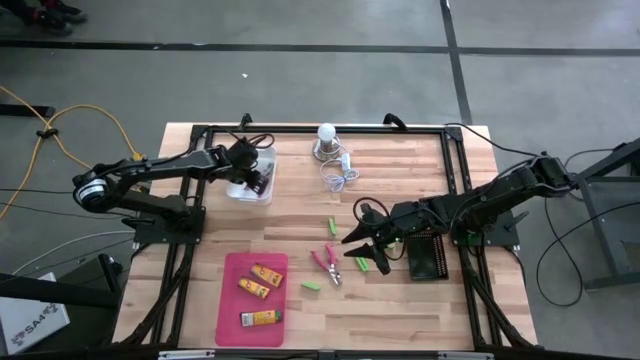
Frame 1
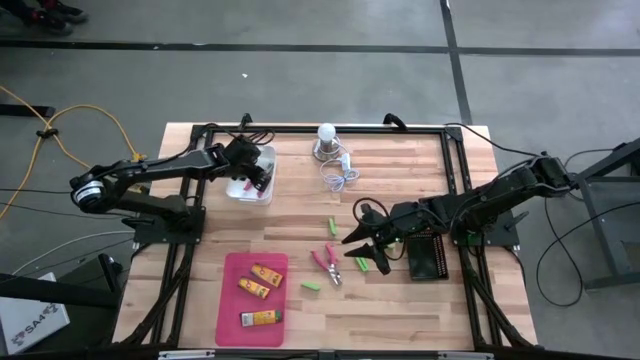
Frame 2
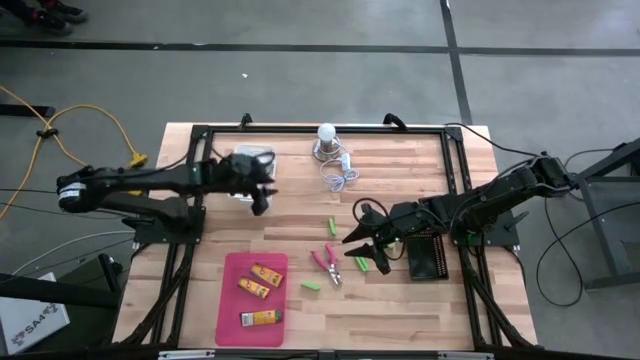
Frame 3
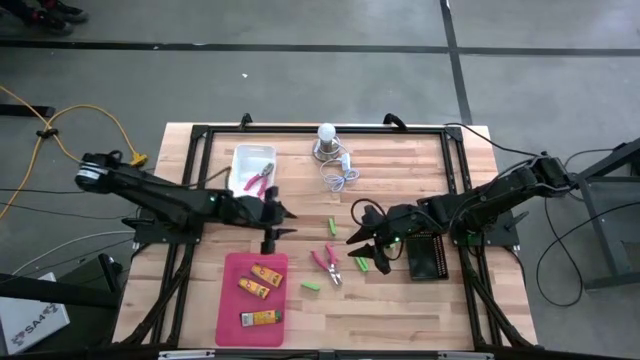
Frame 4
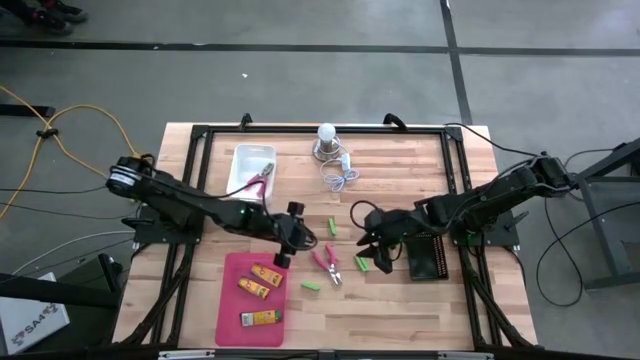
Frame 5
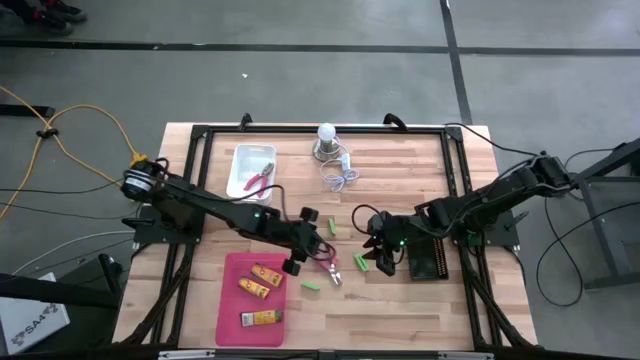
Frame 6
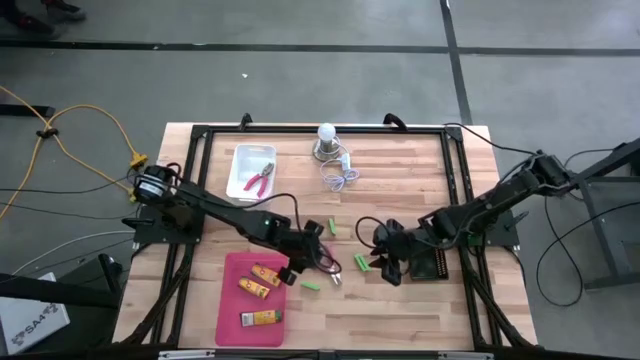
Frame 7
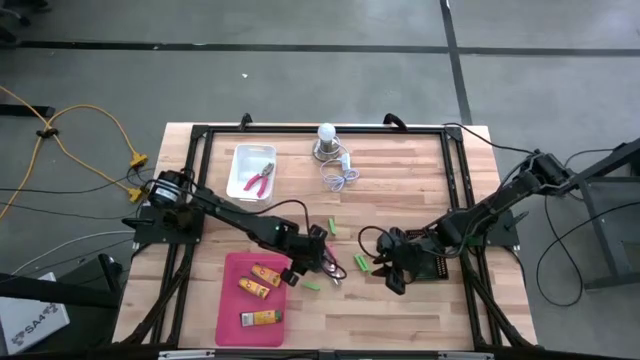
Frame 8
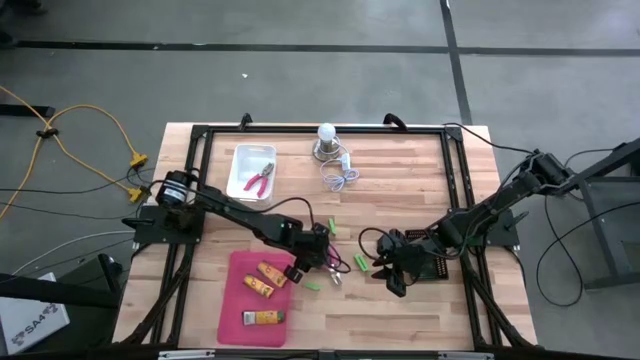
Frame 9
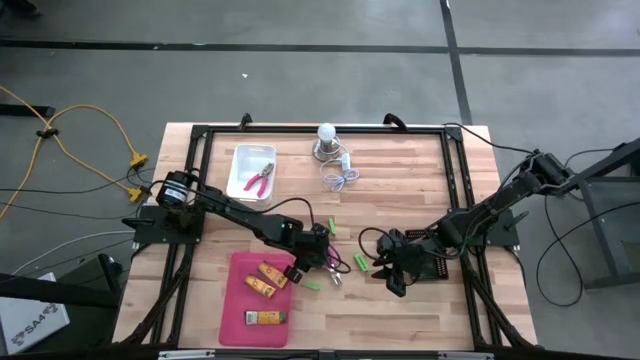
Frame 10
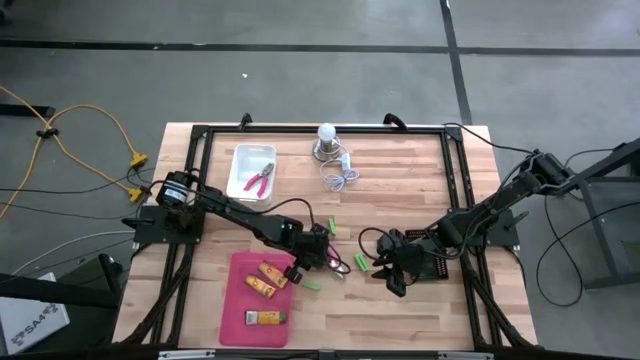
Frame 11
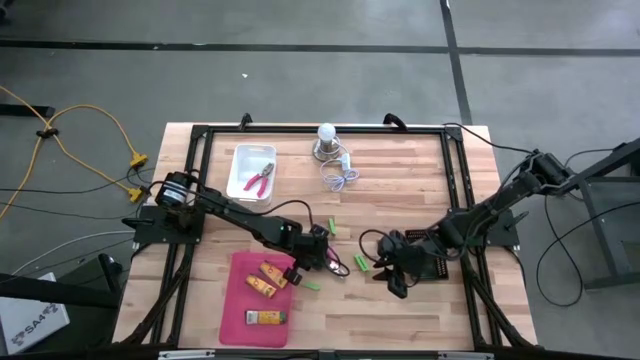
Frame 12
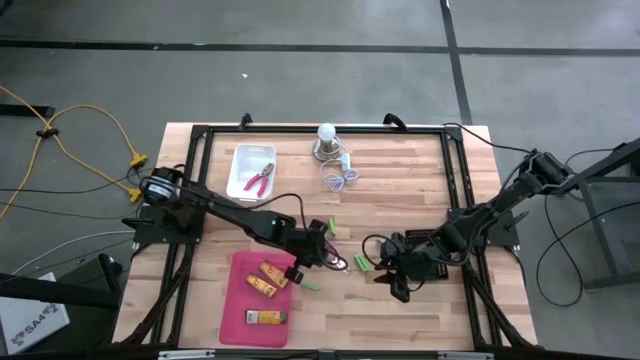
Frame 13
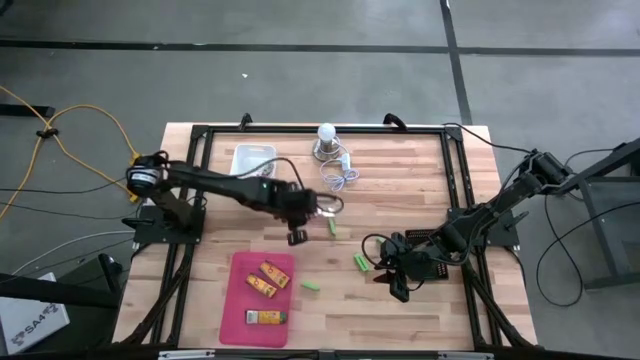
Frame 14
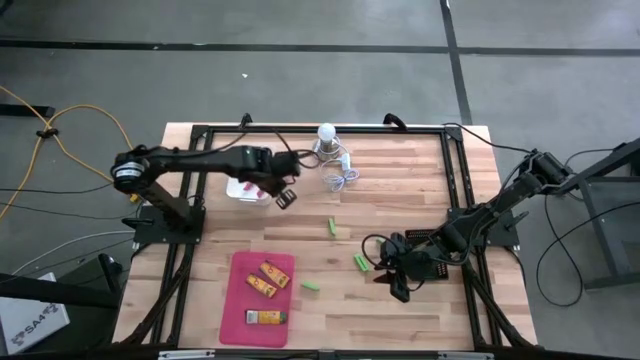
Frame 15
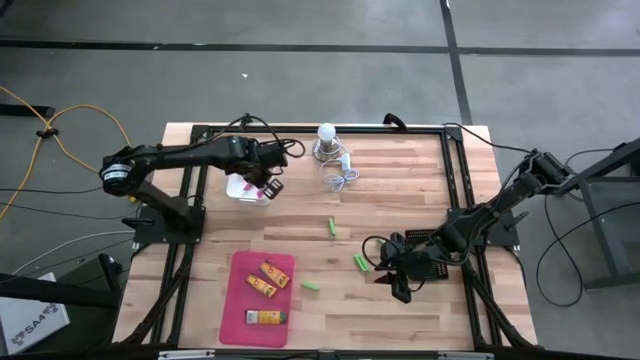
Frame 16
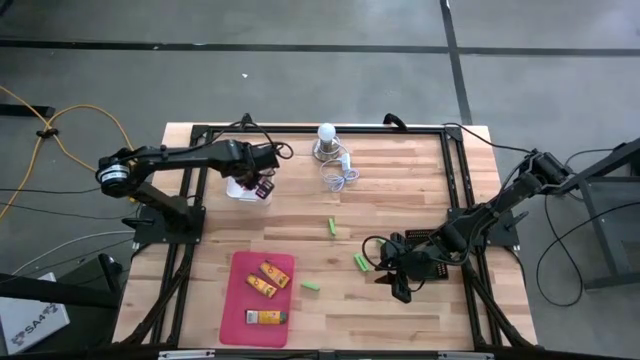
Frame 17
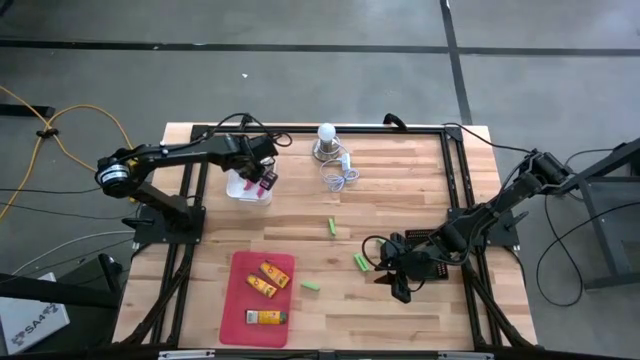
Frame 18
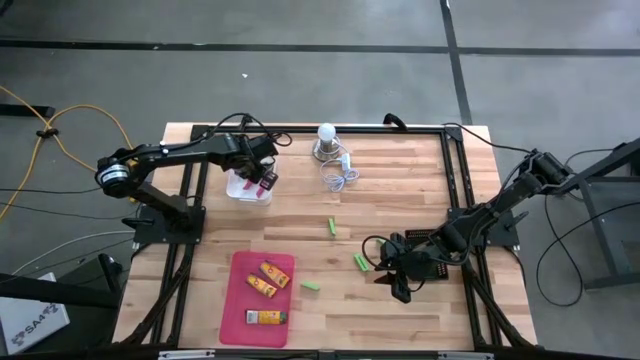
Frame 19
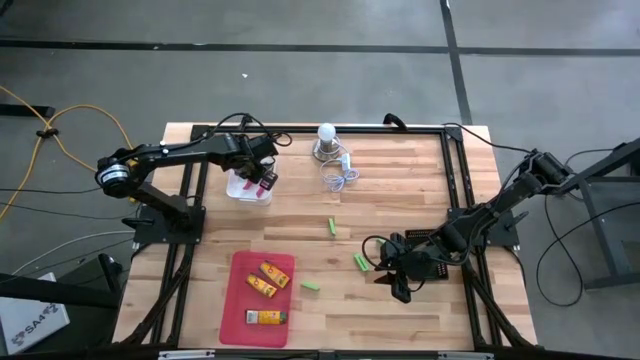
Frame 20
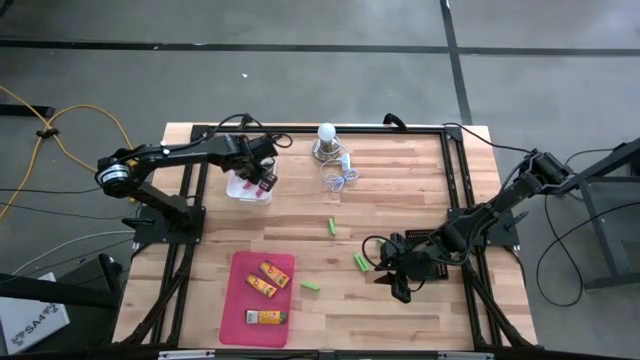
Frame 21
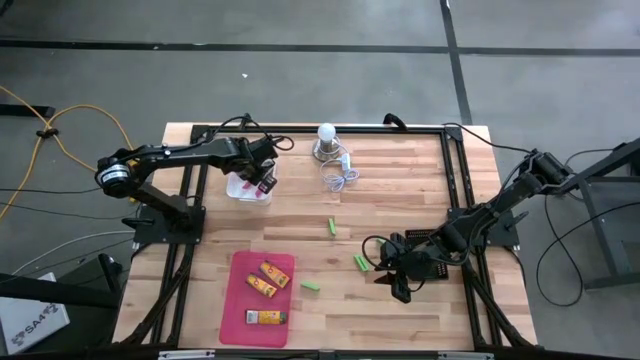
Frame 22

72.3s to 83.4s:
Task: Pick & Place School Supplies
Put the pink pliers into the white bin

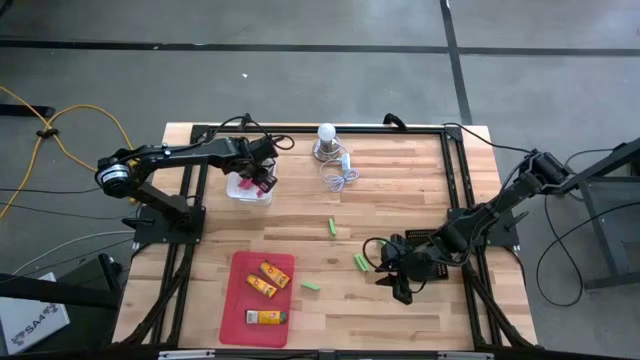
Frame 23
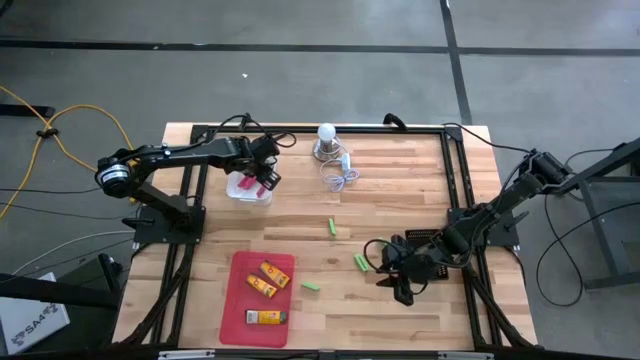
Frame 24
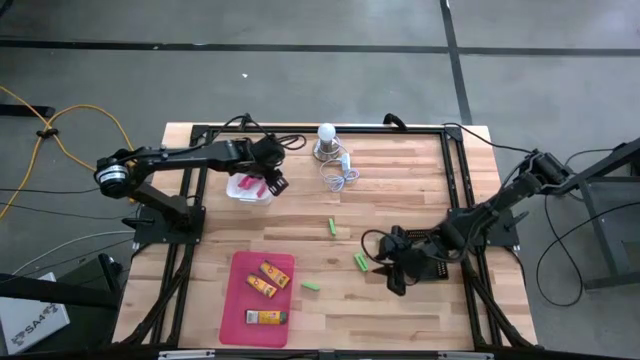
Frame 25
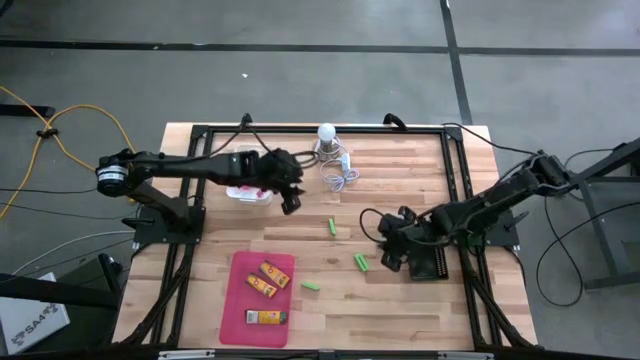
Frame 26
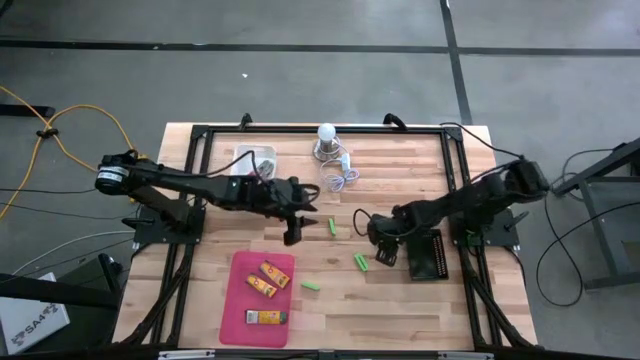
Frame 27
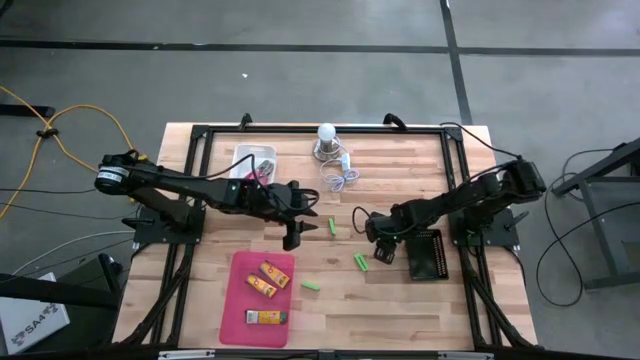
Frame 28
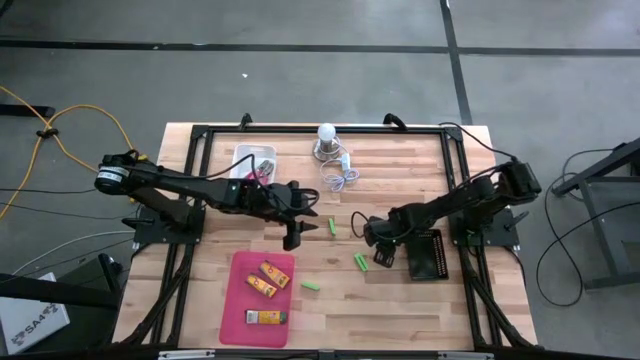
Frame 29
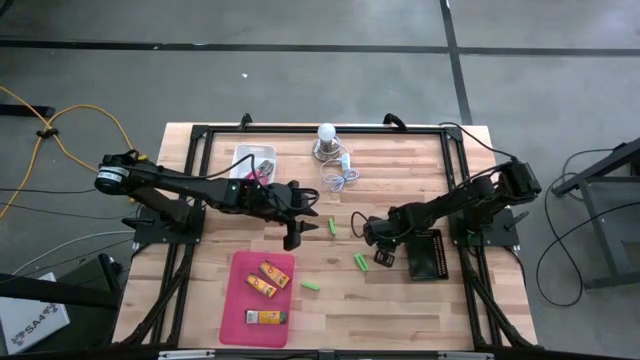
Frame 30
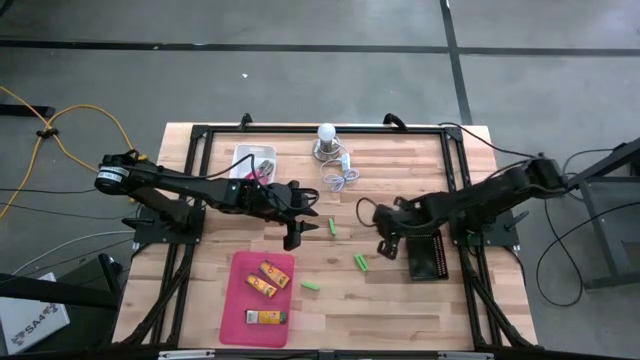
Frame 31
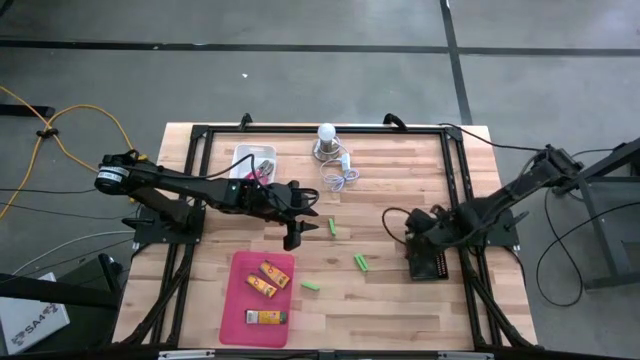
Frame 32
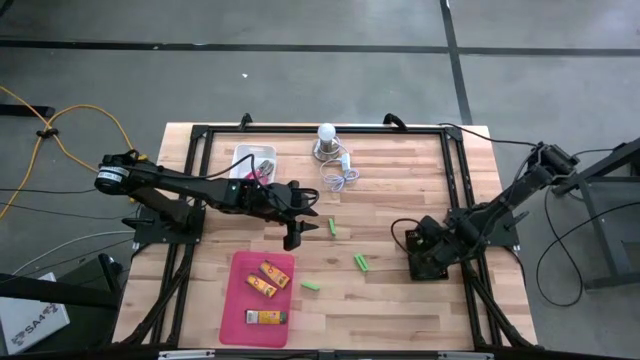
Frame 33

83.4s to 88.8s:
Put the green eraser into the black bin

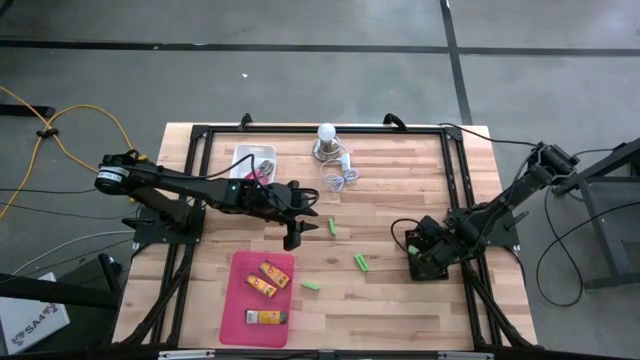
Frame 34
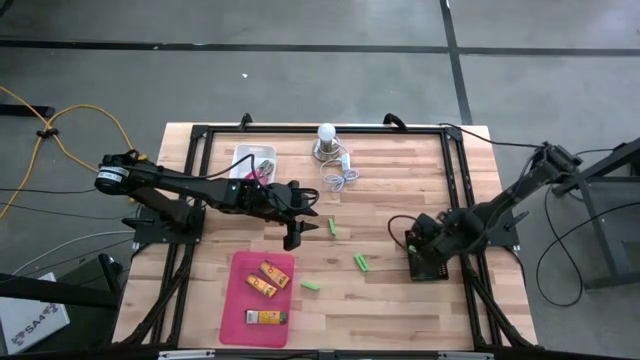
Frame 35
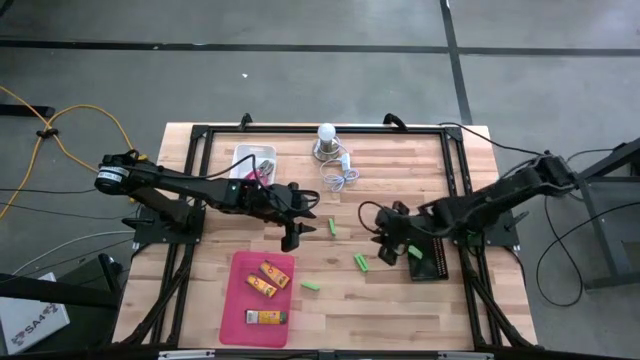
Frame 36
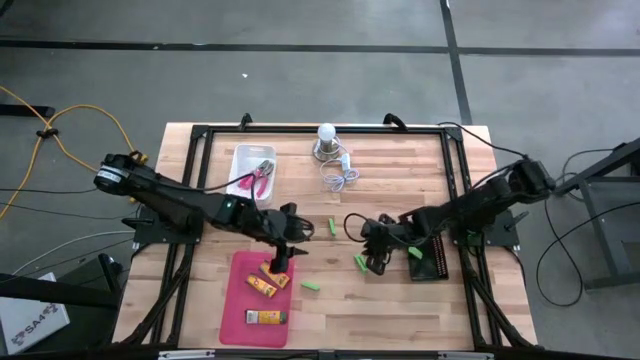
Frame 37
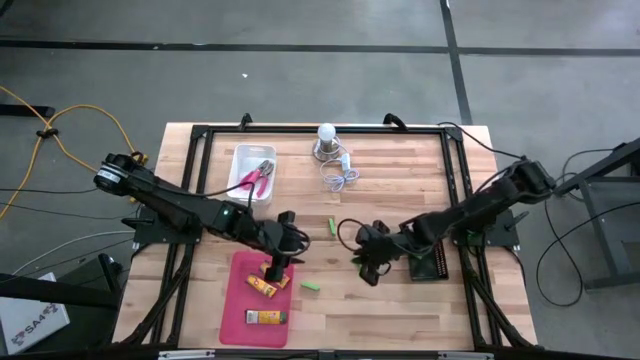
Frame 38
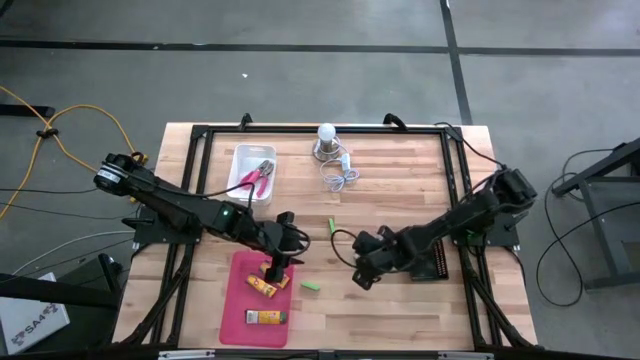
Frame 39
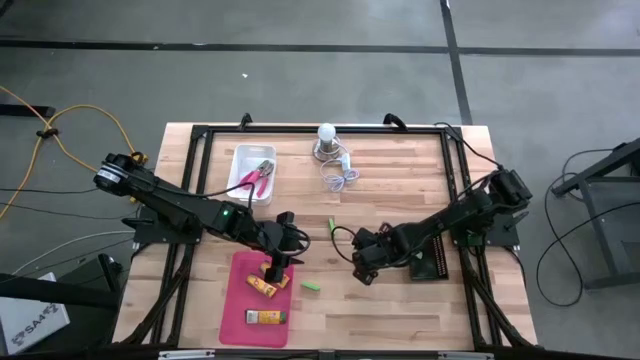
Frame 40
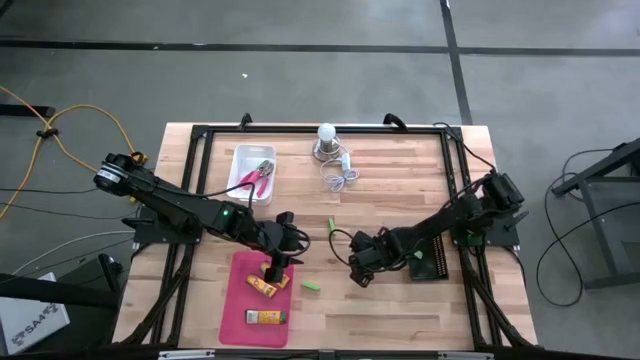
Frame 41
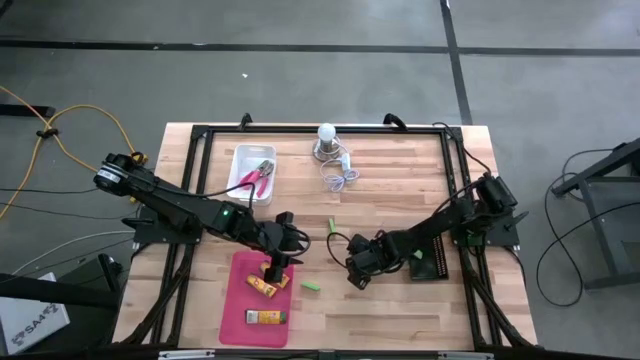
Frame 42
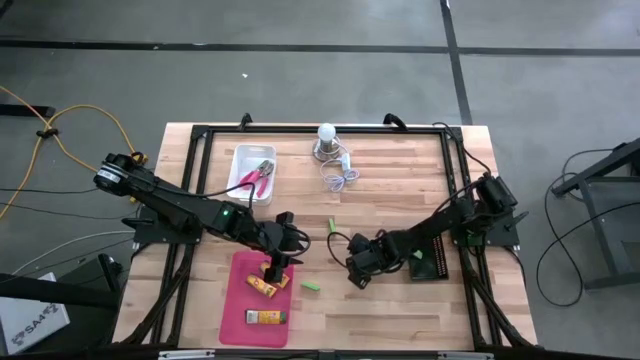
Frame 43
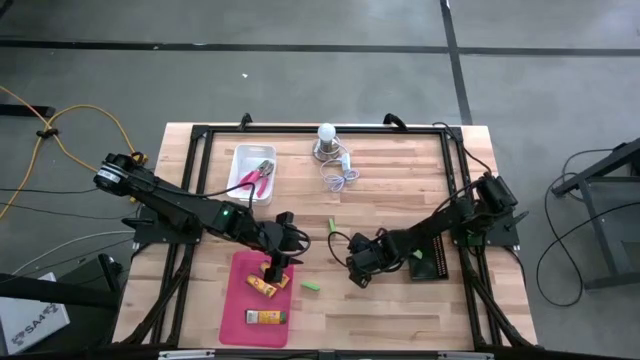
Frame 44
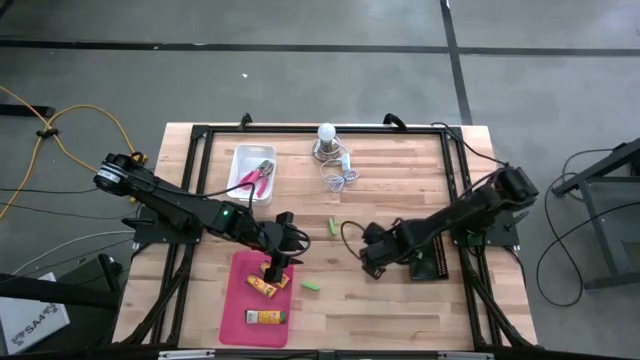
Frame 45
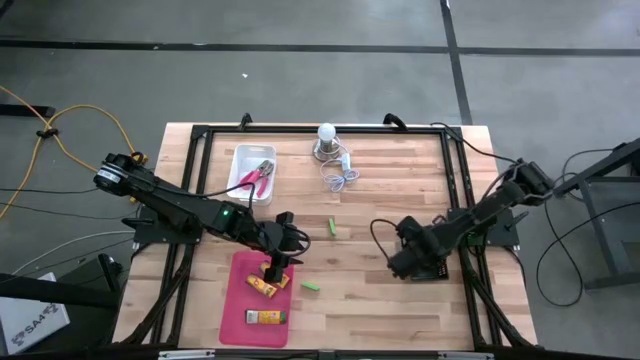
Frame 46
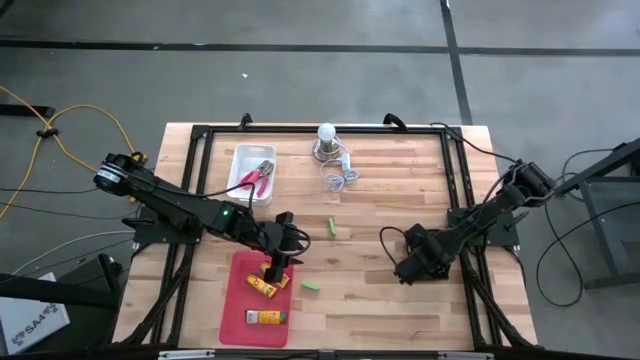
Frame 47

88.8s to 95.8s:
Put the green eraser into the black bin
